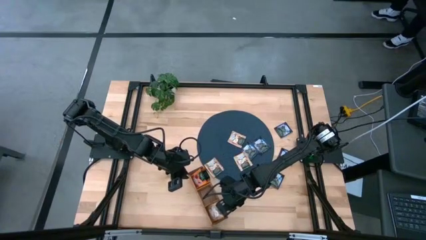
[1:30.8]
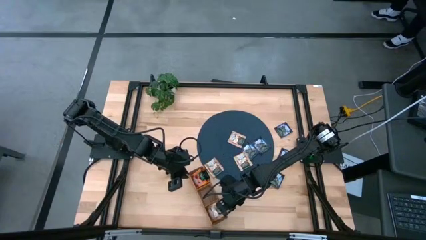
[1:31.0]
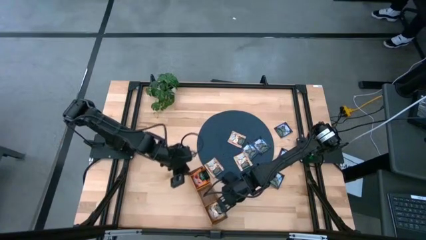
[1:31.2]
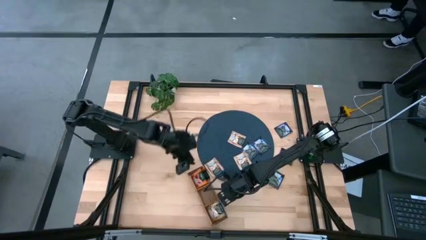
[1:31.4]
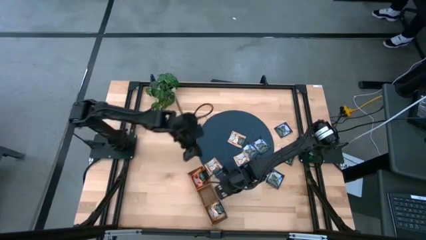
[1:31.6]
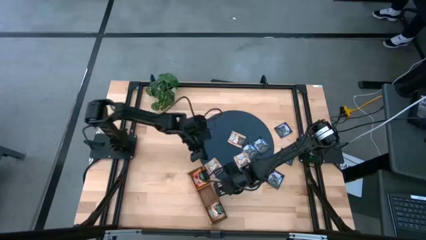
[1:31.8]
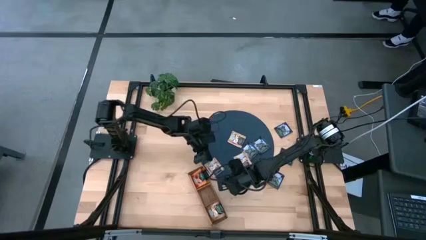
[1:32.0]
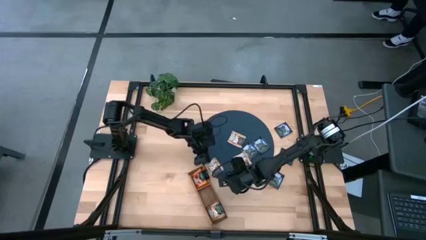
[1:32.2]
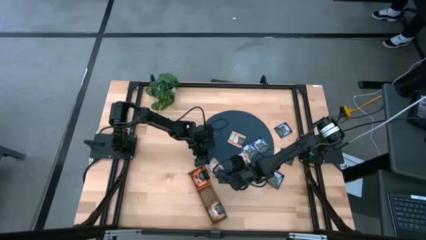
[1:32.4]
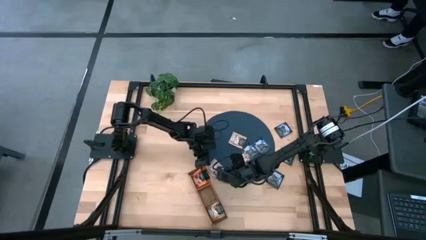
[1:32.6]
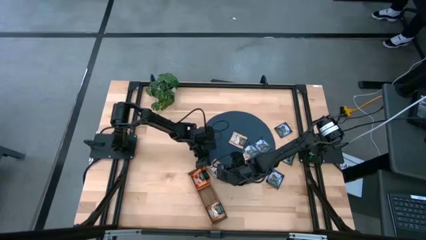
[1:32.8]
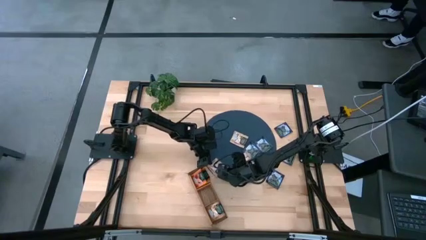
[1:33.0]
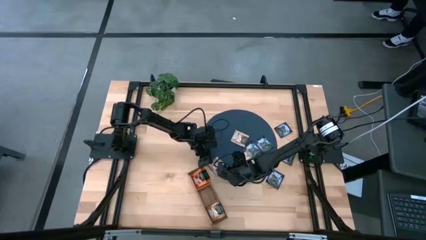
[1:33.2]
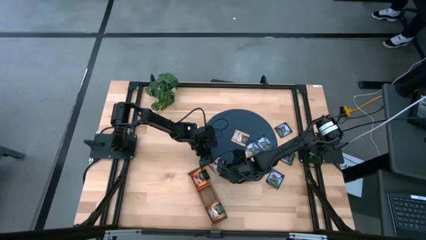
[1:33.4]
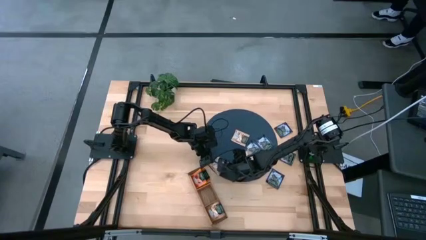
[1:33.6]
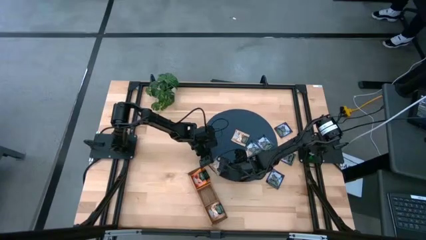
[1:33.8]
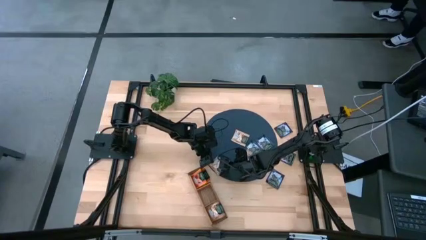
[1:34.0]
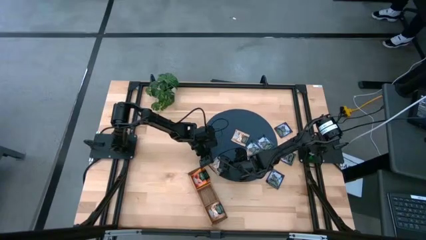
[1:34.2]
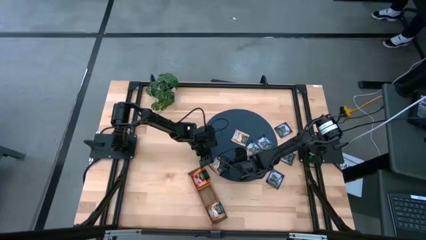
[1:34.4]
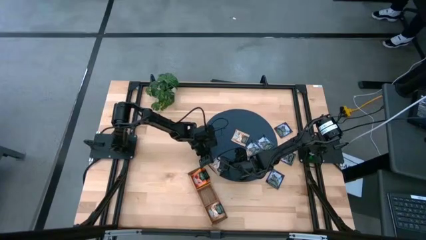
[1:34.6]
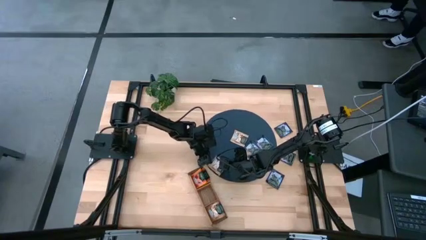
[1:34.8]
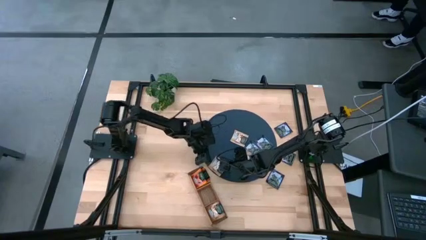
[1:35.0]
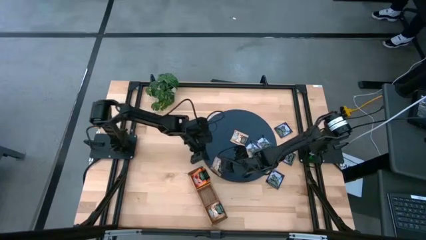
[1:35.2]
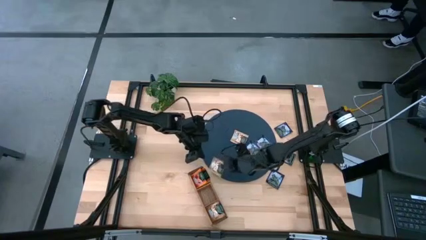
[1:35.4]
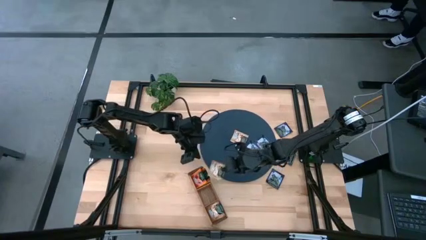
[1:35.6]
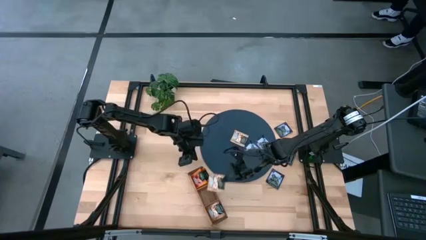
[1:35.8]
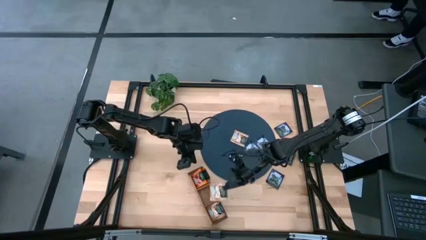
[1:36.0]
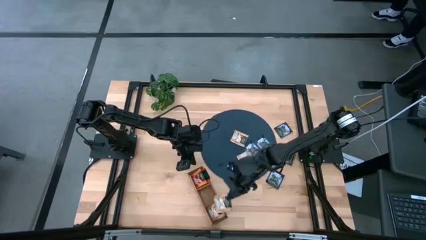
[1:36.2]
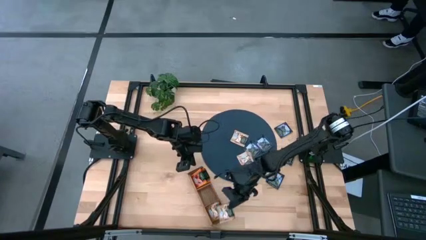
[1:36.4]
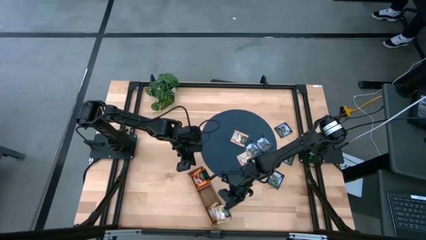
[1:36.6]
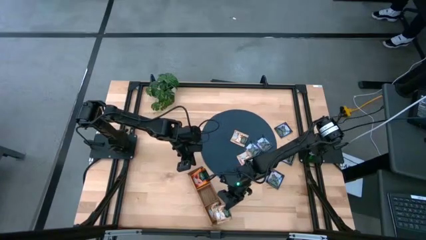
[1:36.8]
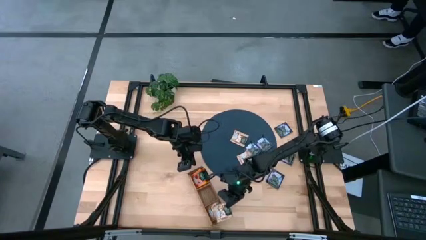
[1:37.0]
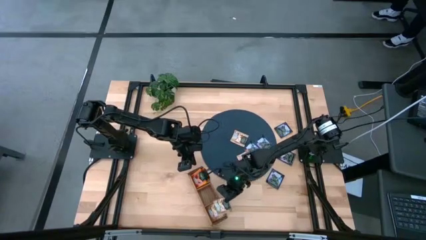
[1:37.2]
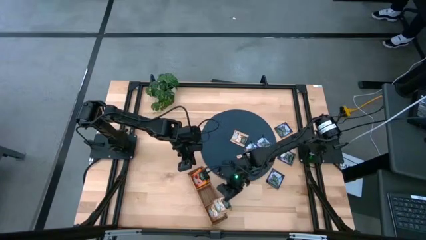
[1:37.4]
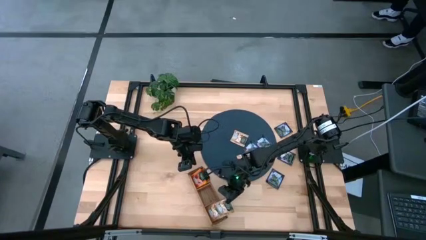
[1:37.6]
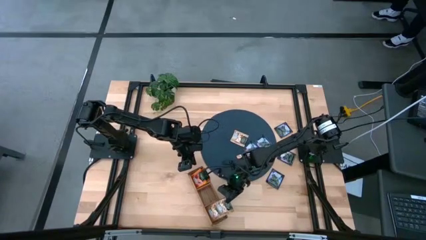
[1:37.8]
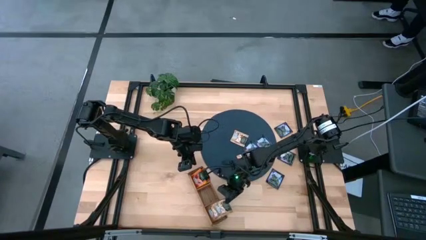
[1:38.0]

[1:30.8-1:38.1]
Task: Pick & Place Tea
Put the brown tea bag into the right section of the wooden organizer

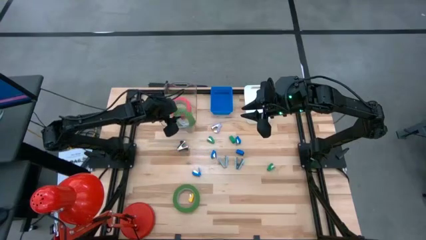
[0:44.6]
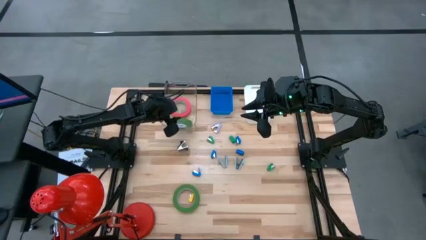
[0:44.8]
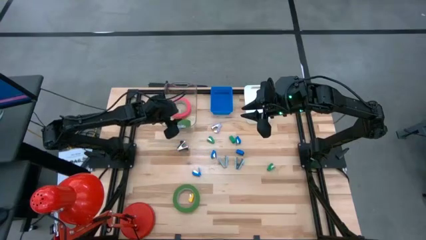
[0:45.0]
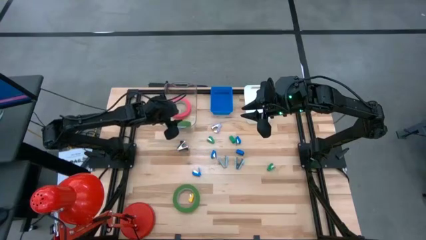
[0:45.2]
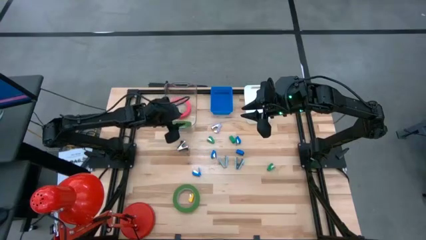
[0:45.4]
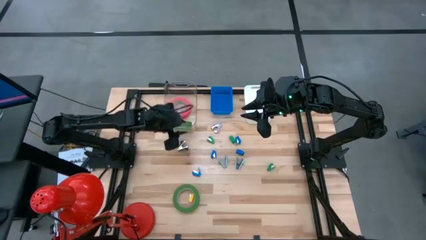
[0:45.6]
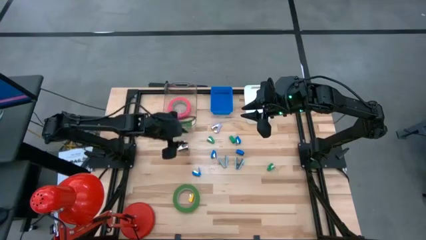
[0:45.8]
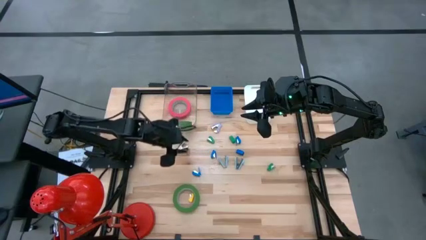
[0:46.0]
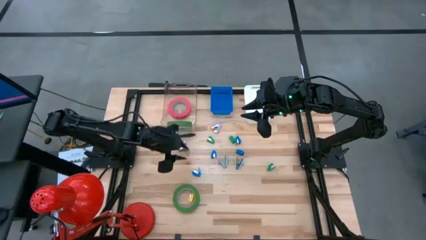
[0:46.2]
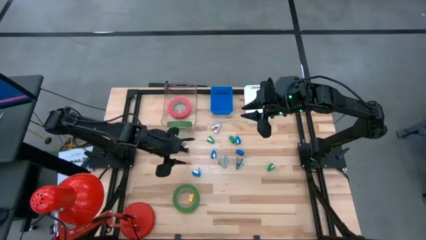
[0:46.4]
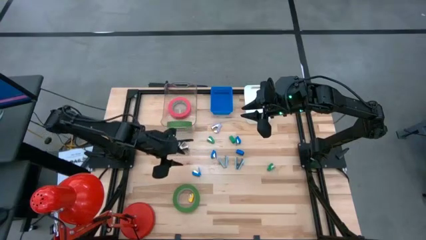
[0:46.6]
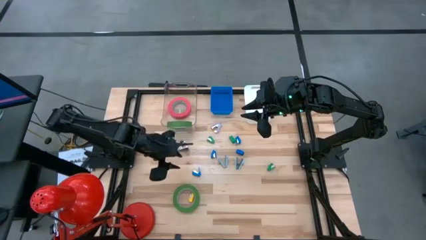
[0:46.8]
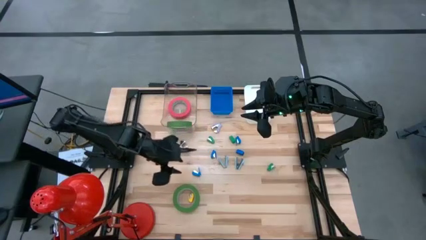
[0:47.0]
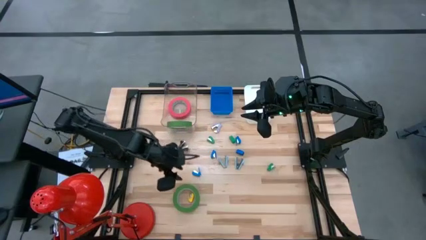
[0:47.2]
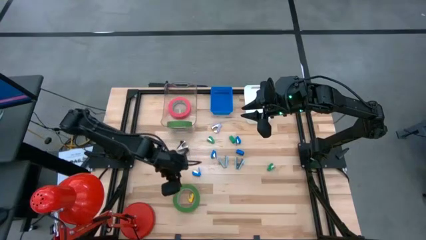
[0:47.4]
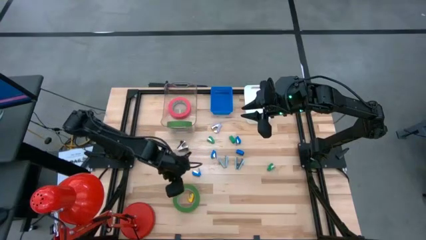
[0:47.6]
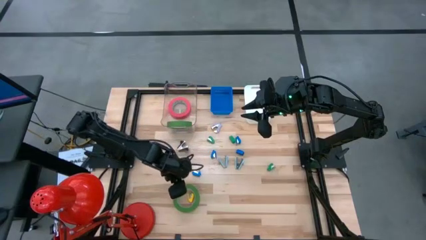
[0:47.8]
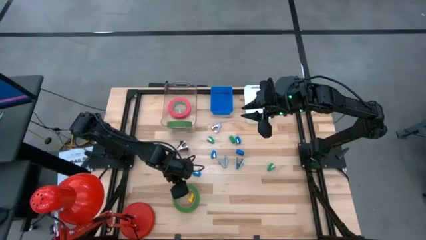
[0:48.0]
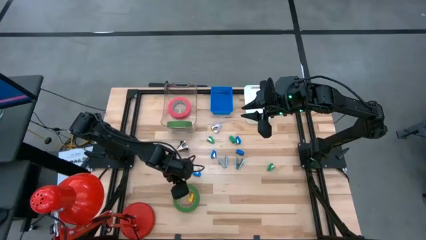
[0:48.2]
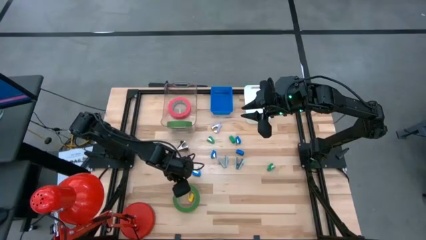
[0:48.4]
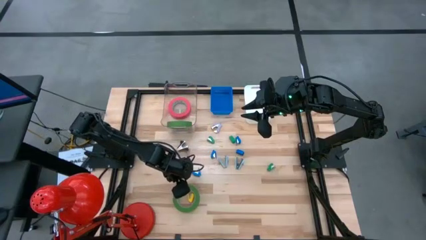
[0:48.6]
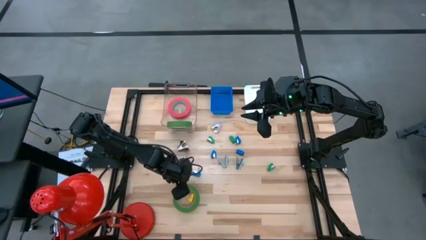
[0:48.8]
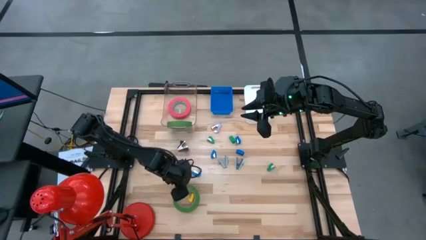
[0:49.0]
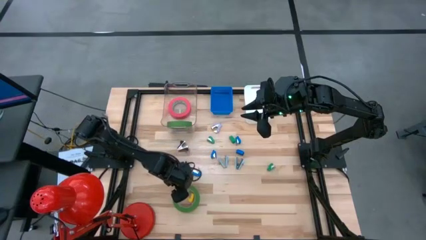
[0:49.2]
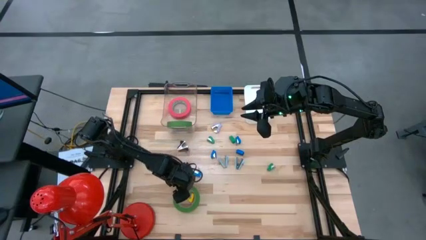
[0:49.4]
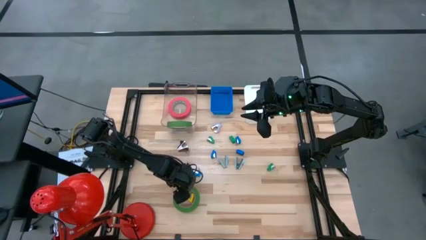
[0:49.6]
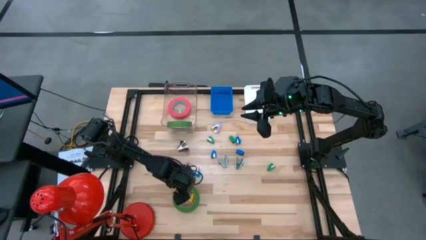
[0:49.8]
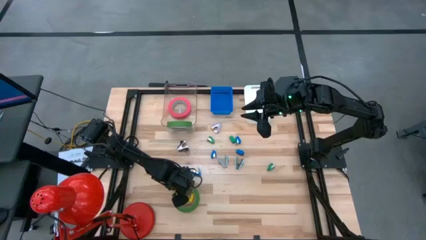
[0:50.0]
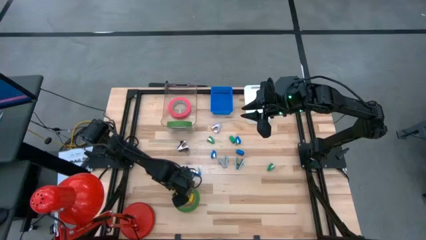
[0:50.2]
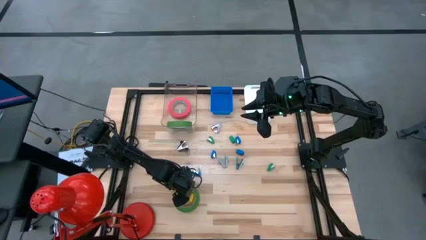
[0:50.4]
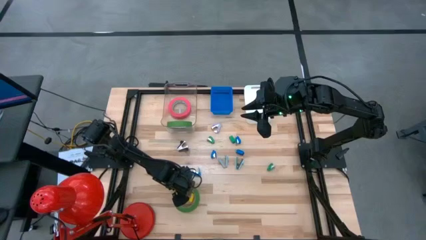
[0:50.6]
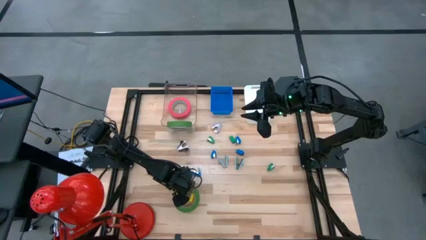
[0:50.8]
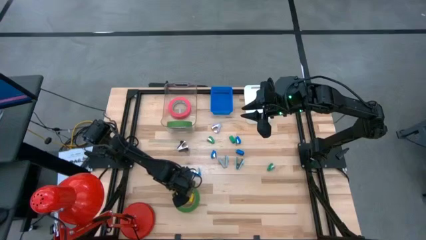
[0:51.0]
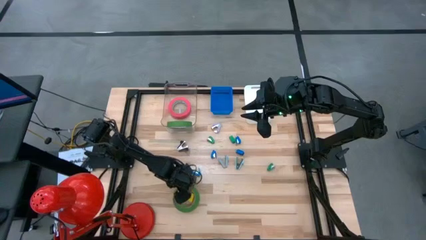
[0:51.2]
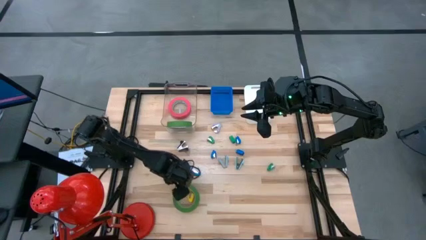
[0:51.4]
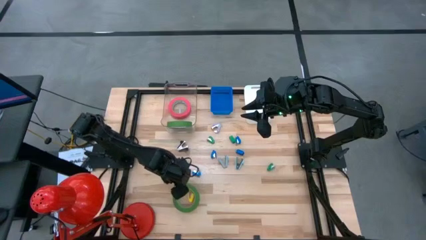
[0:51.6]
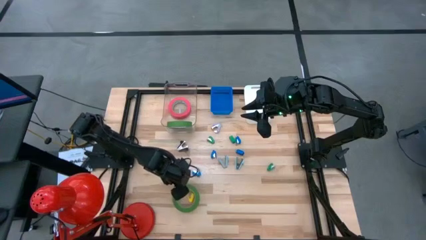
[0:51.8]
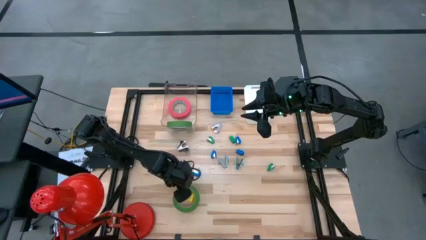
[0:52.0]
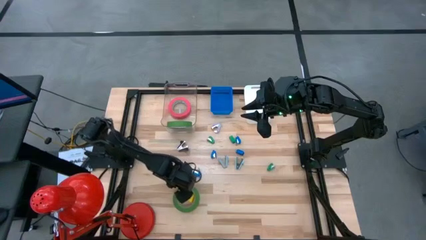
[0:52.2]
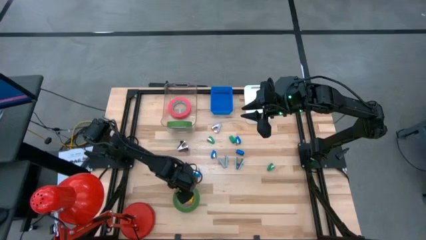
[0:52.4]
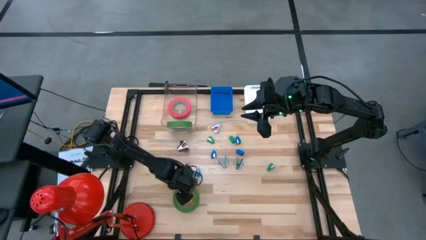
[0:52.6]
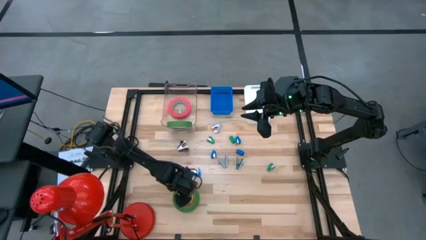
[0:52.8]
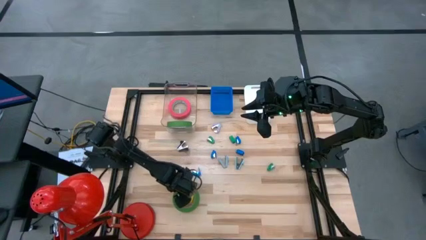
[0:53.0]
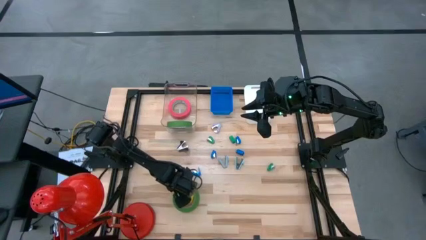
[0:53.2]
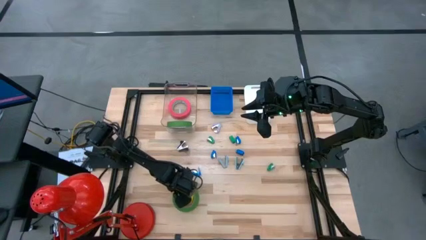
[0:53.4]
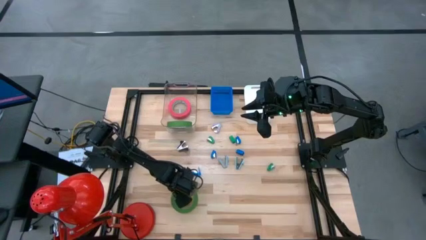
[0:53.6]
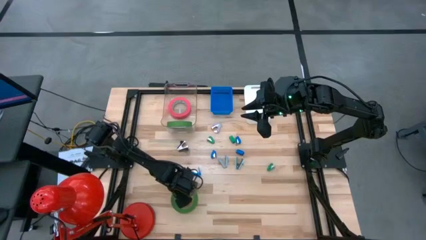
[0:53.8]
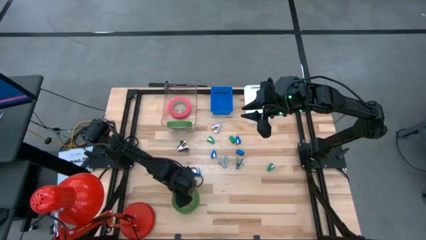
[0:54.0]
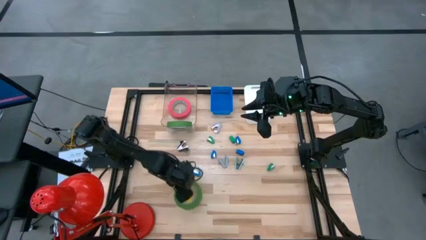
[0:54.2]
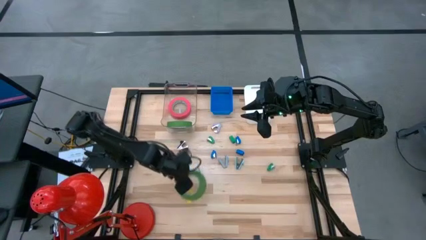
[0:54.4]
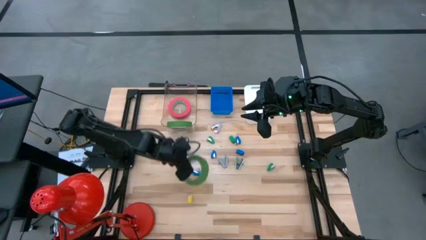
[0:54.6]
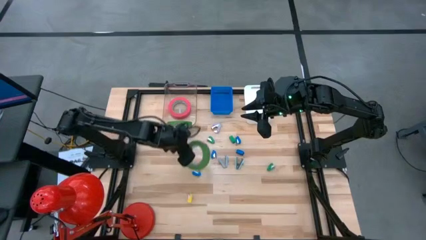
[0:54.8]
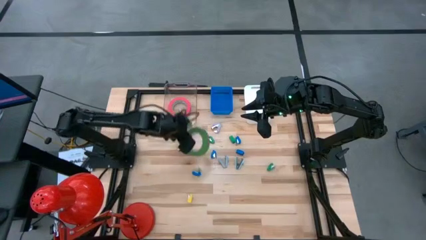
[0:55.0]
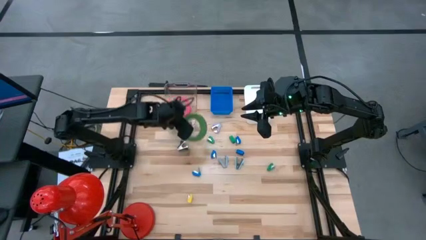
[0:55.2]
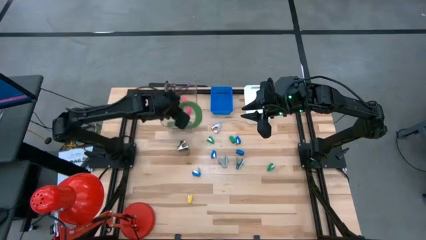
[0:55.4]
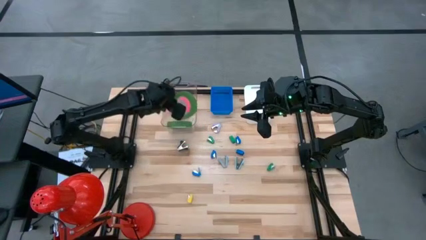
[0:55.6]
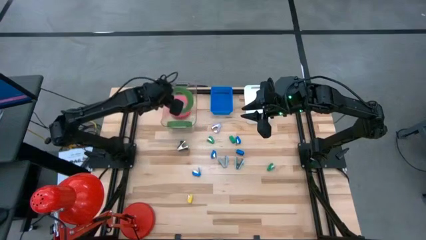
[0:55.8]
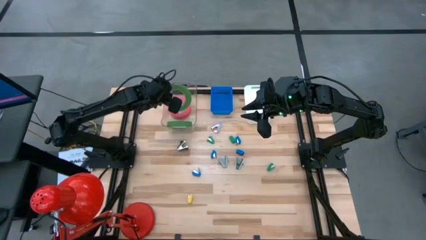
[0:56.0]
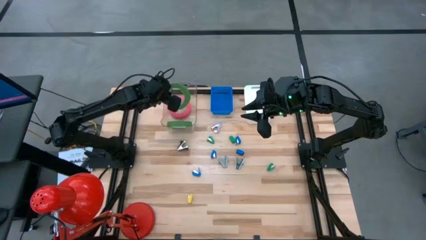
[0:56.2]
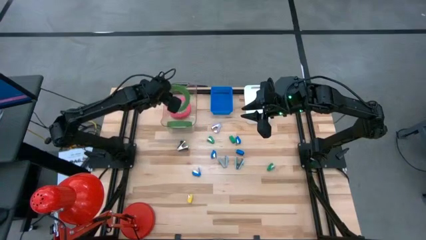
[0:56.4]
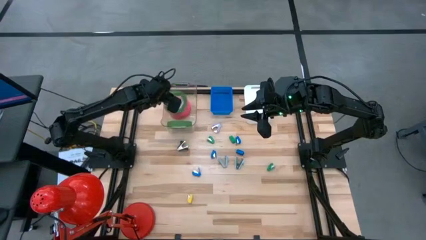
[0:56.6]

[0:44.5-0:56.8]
Task: Pick and place Stapler, Stapler remover, tape
Put the green tape into the transparent bin
